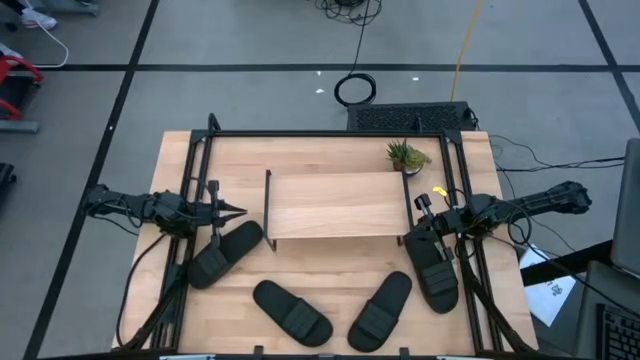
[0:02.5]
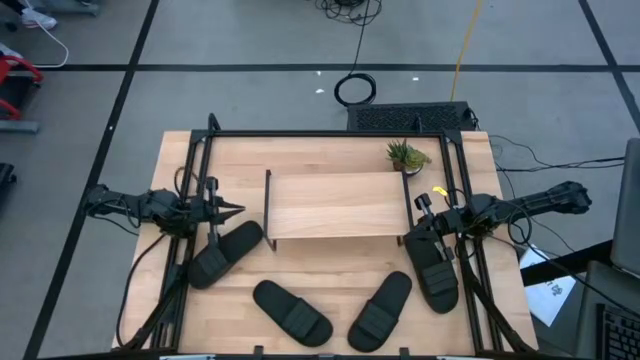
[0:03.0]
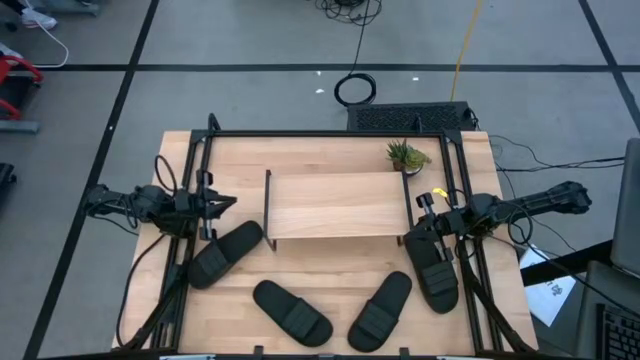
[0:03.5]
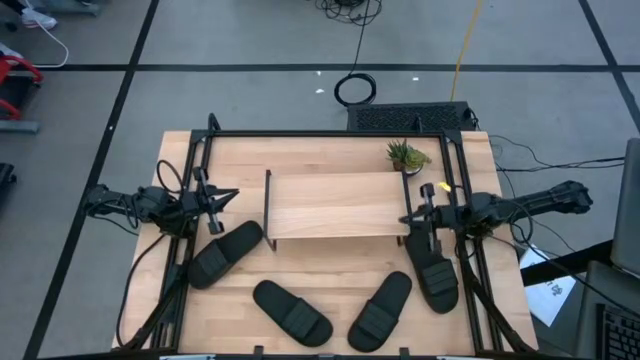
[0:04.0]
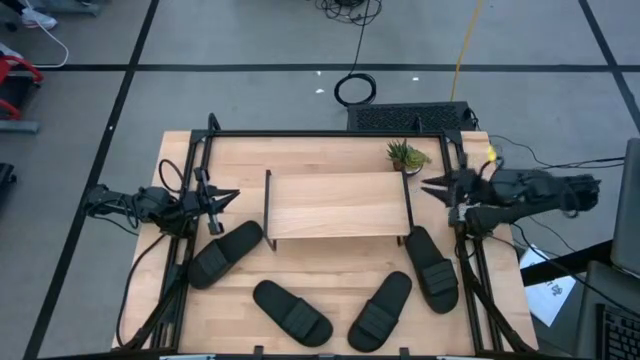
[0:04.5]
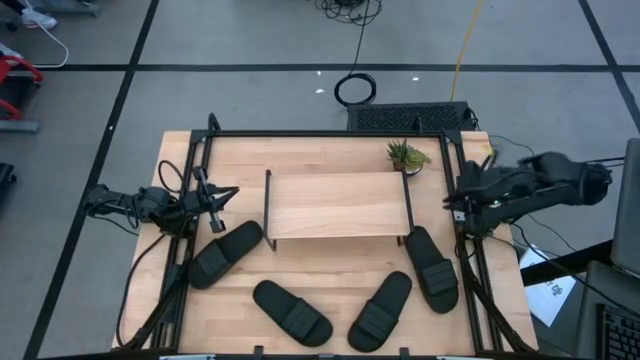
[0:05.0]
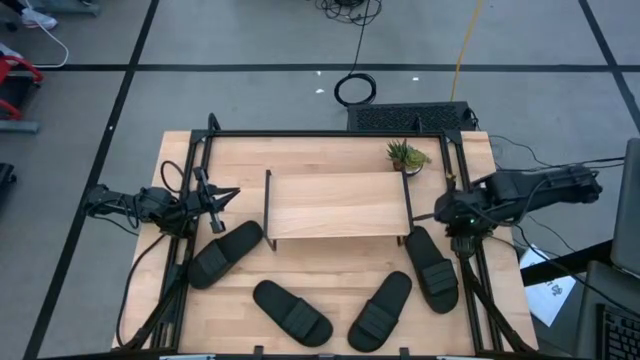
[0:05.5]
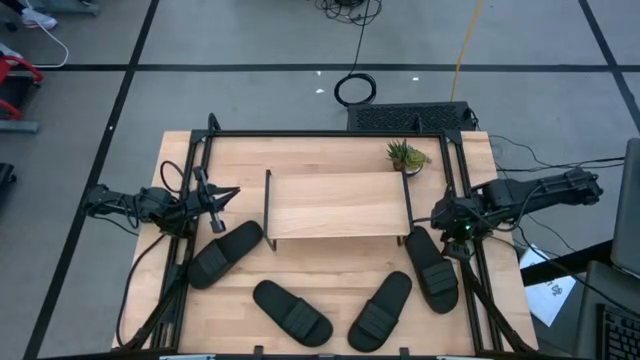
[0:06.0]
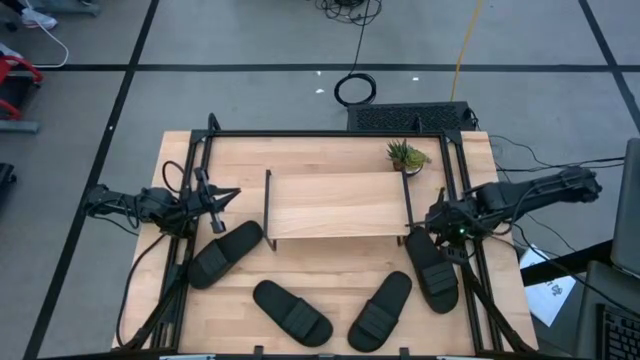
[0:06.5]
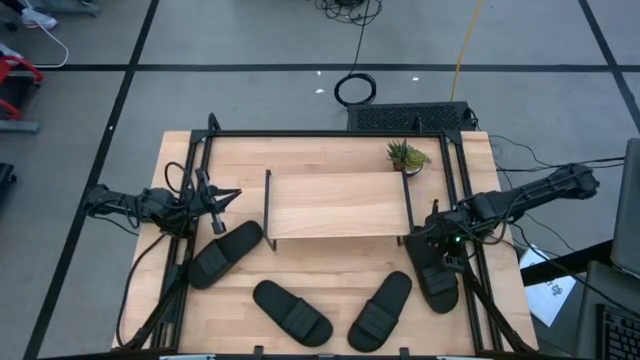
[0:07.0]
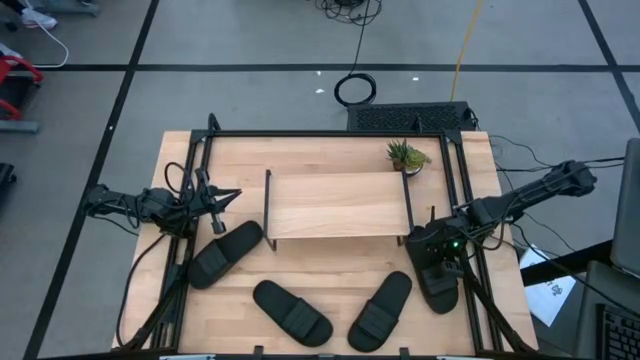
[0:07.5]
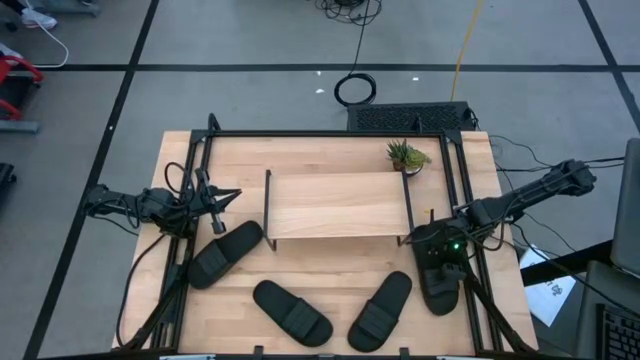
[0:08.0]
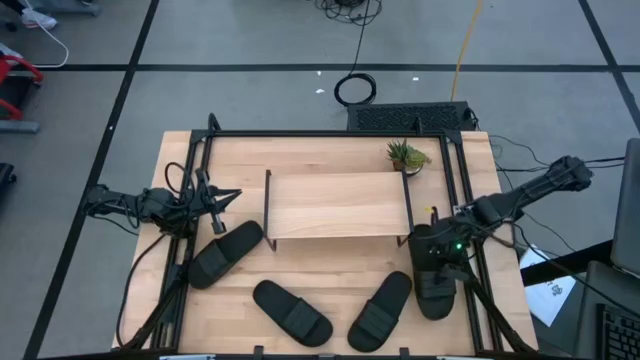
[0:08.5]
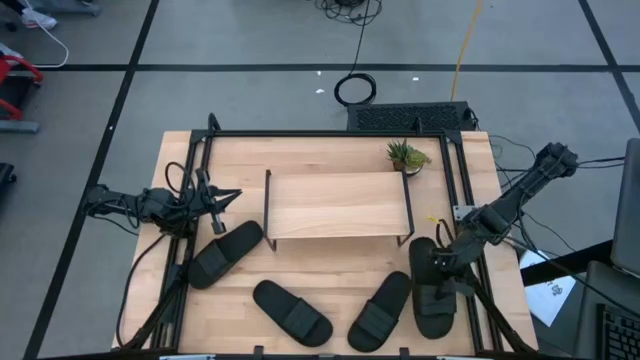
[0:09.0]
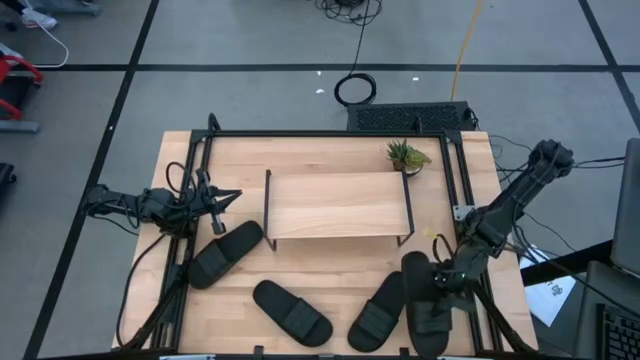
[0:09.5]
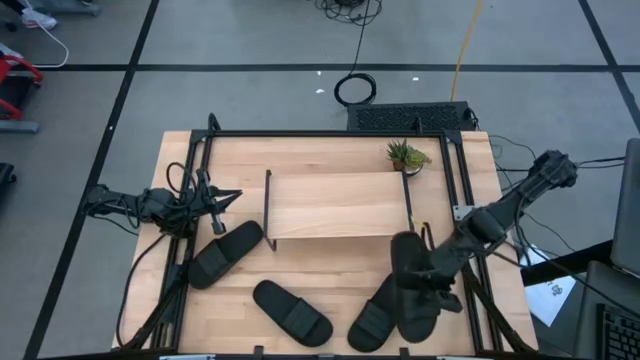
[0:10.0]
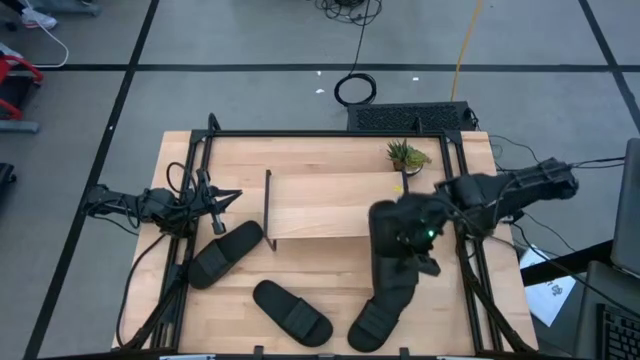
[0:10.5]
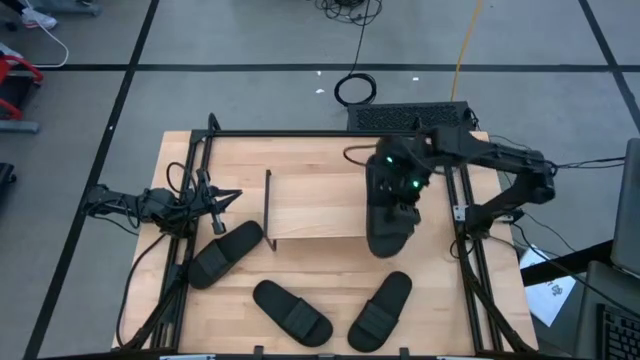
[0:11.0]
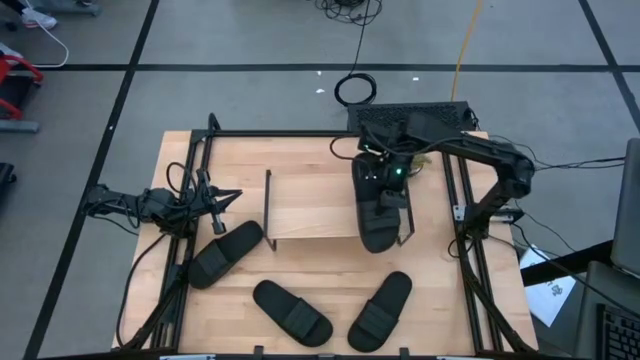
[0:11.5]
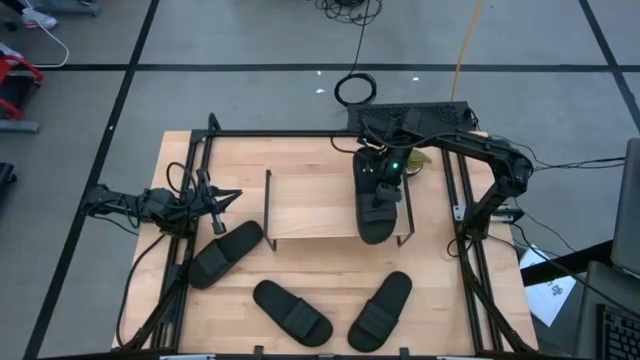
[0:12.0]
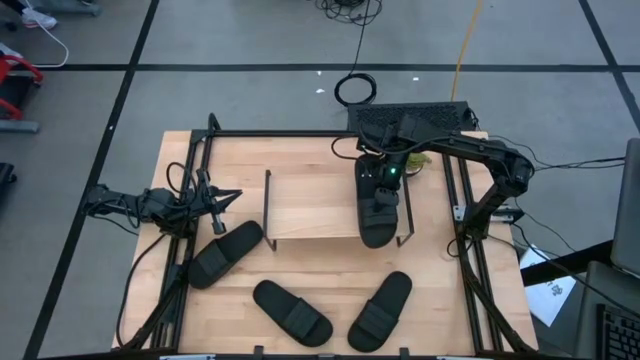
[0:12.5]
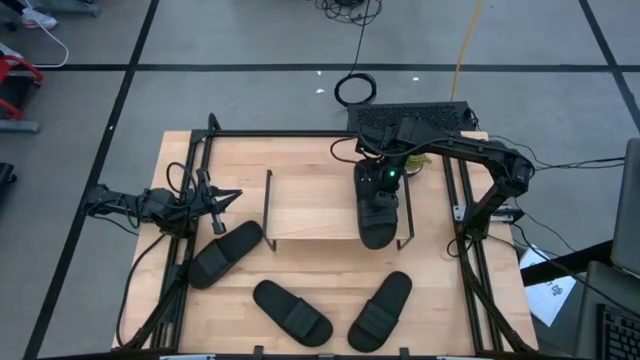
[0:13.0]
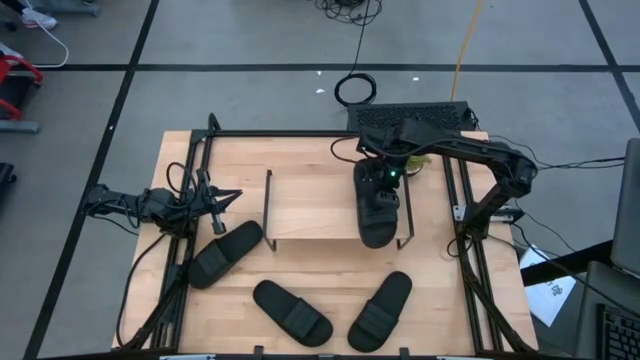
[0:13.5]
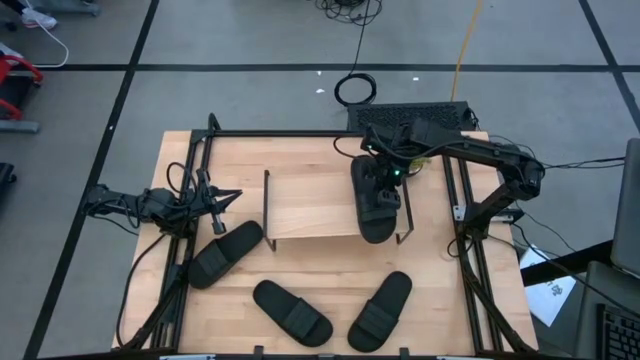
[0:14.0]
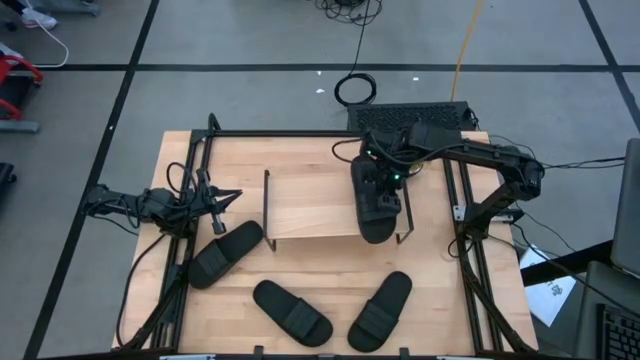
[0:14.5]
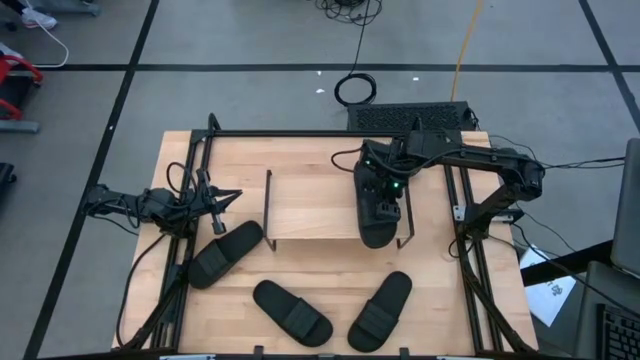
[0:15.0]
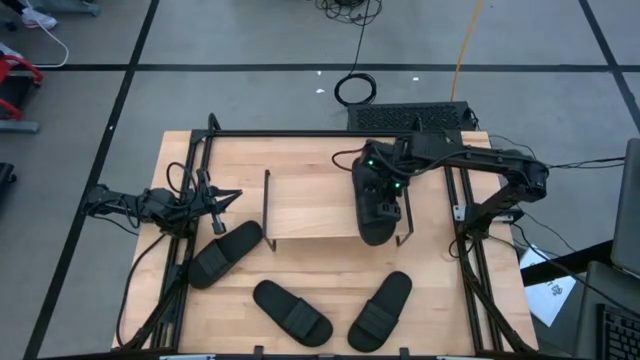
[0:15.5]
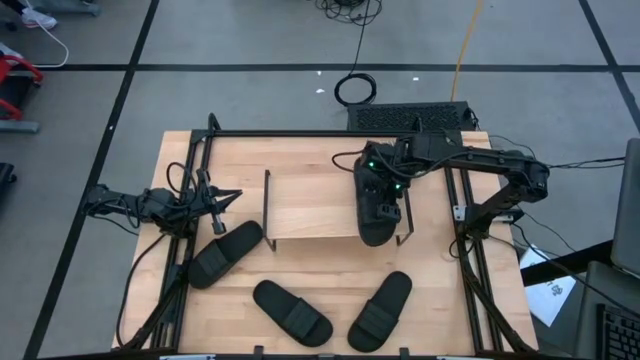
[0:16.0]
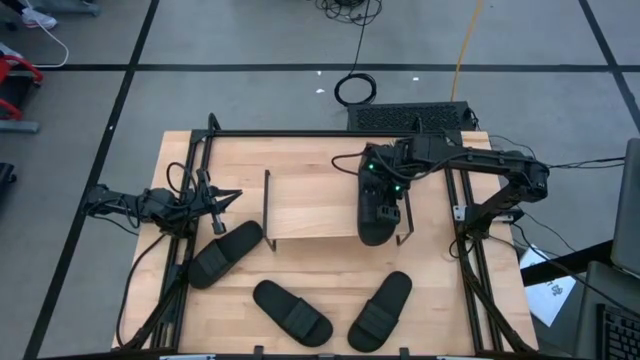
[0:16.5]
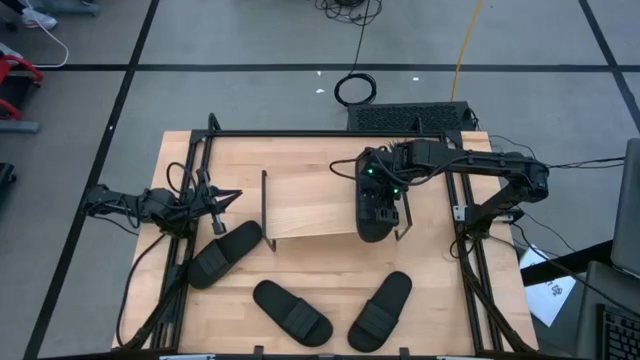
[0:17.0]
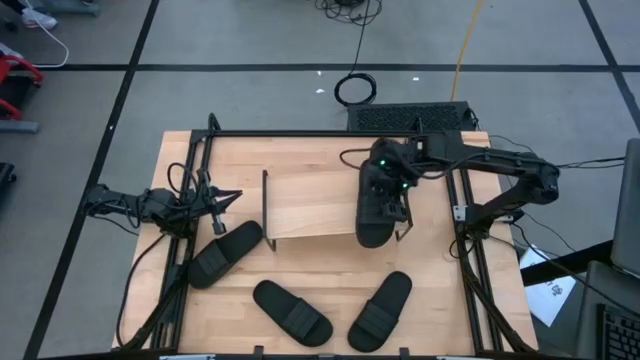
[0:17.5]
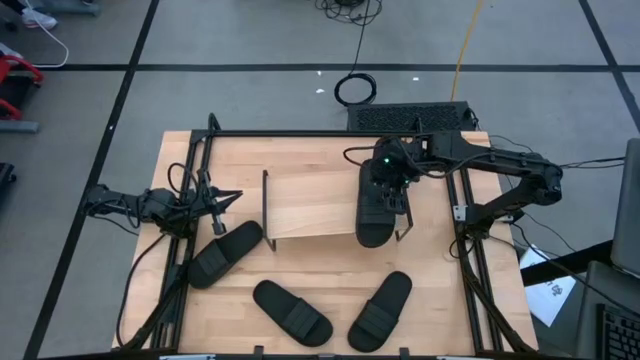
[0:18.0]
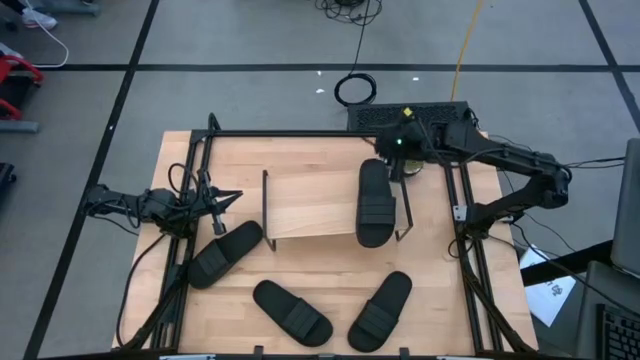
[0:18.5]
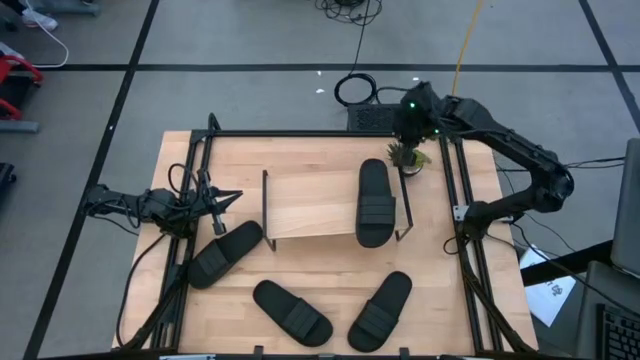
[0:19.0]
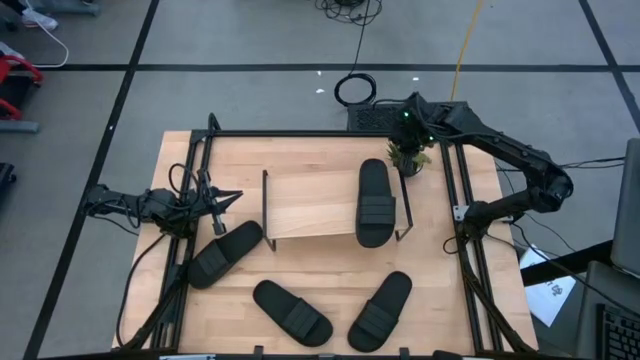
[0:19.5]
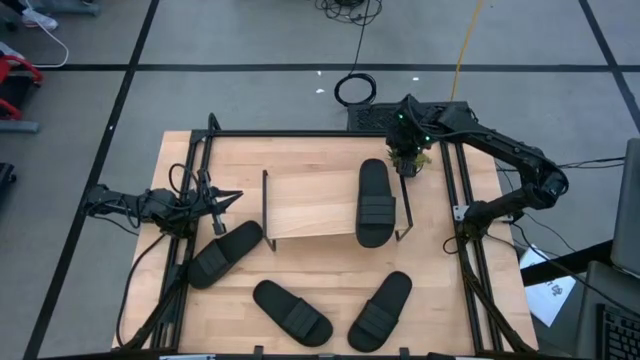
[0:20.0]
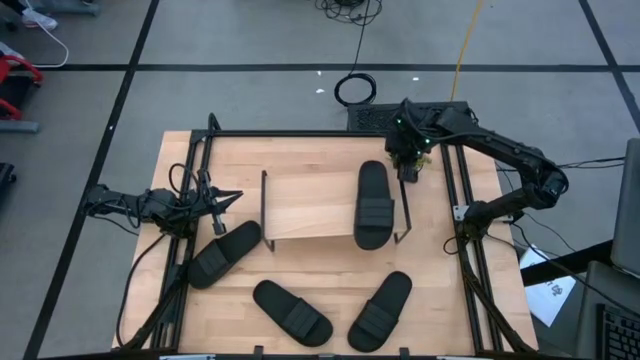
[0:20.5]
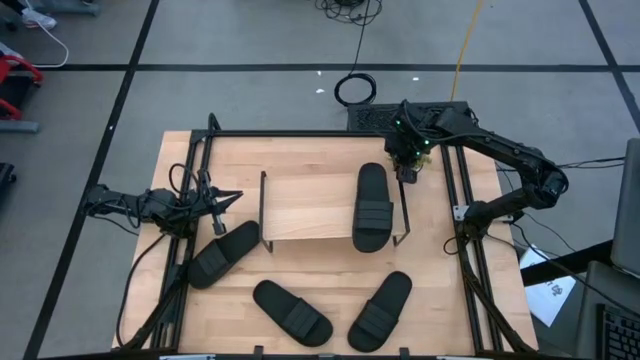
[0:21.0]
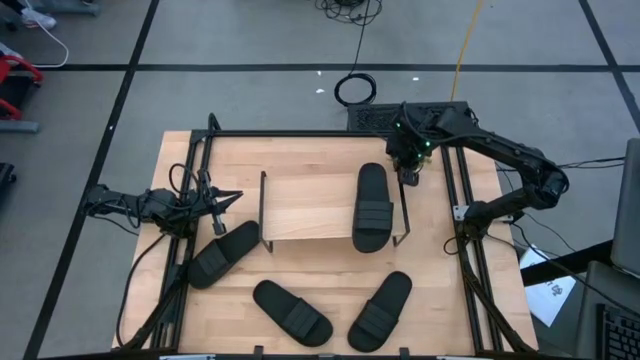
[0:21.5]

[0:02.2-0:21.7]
Task: Pick and place slides into the shelf
Put the black slide on the shelf
